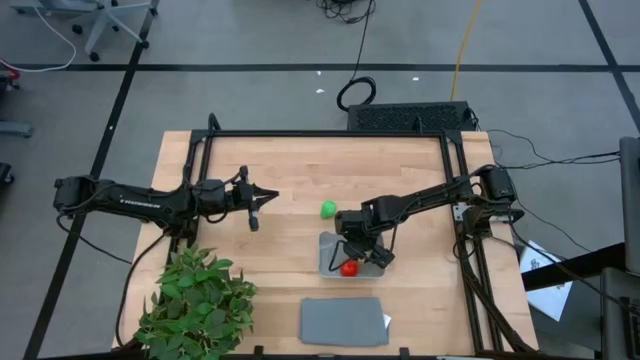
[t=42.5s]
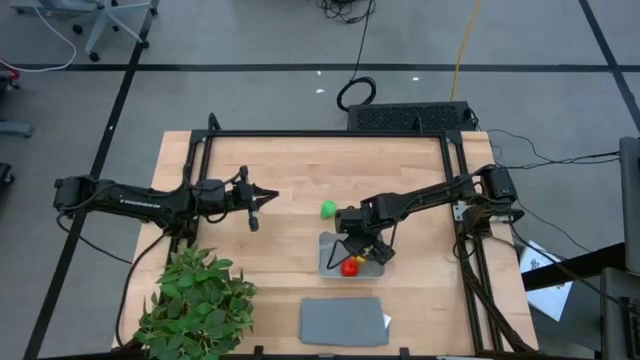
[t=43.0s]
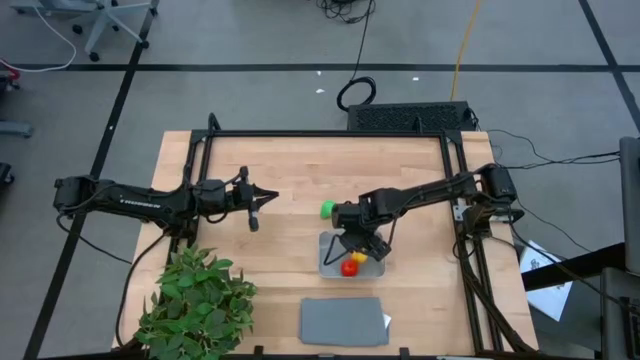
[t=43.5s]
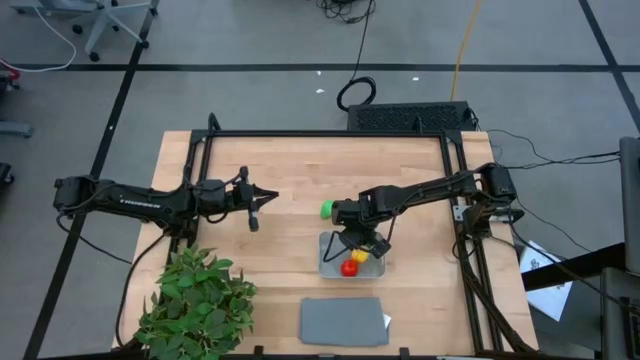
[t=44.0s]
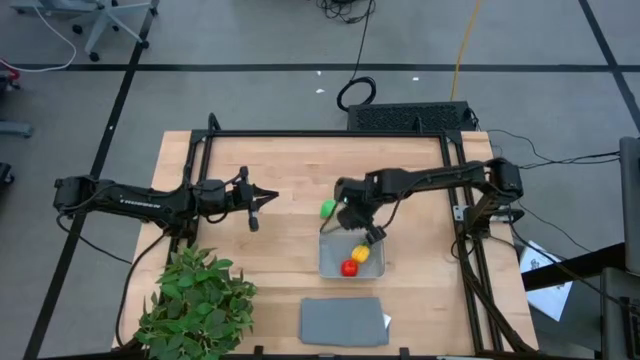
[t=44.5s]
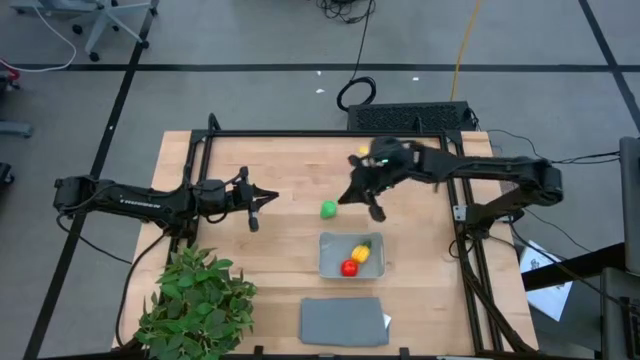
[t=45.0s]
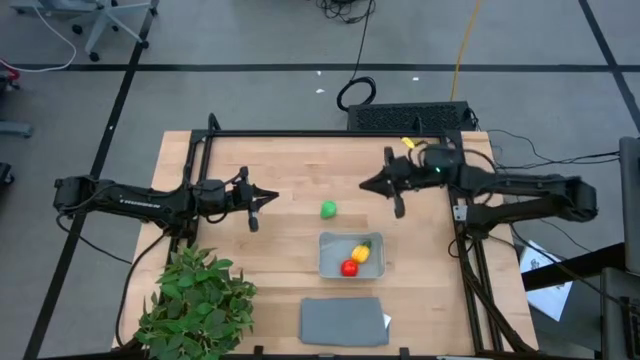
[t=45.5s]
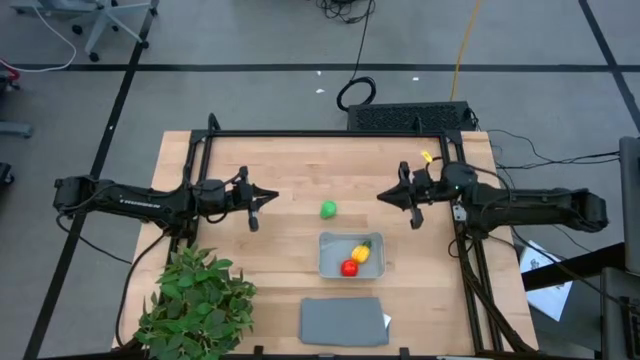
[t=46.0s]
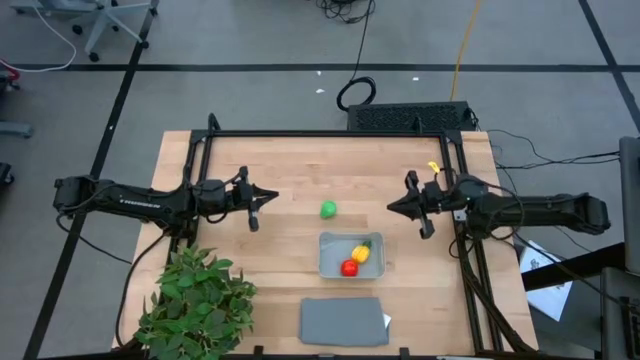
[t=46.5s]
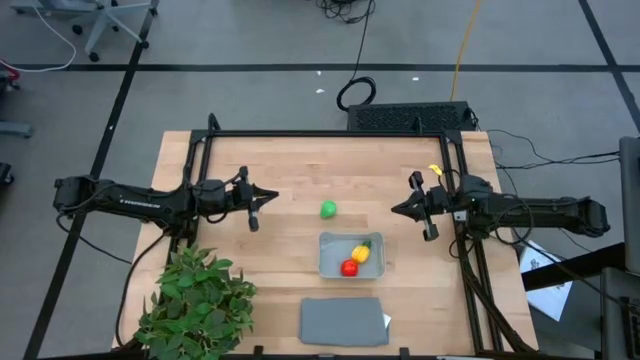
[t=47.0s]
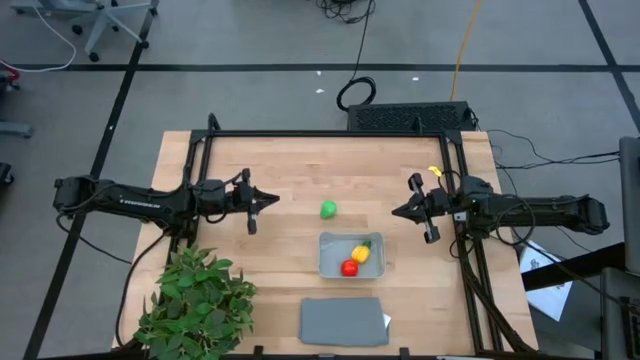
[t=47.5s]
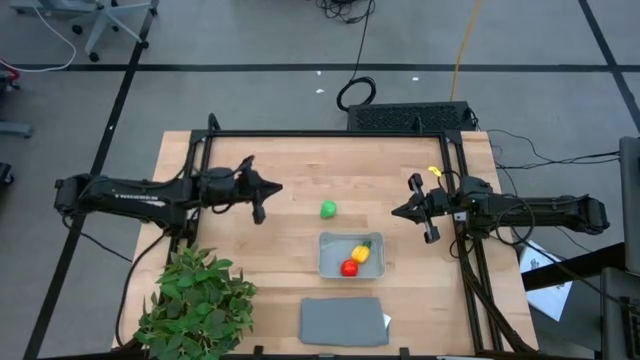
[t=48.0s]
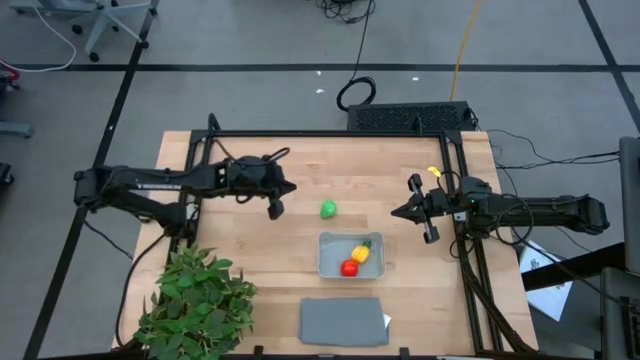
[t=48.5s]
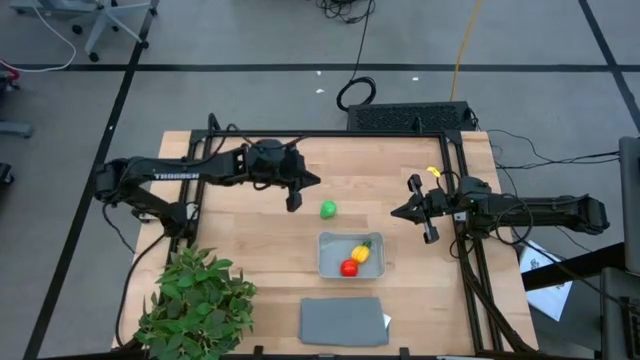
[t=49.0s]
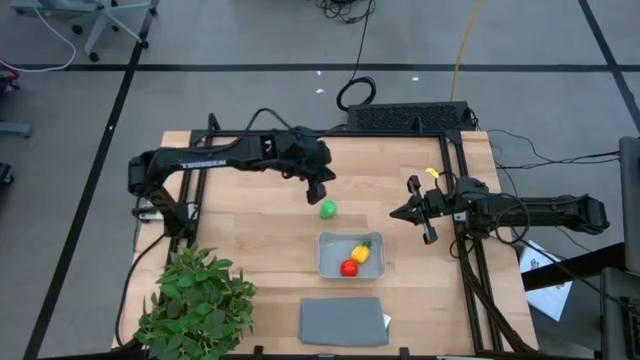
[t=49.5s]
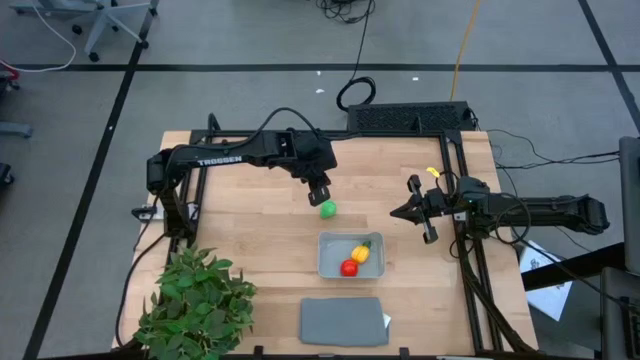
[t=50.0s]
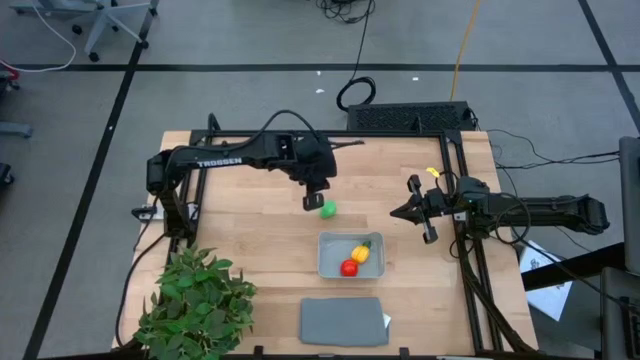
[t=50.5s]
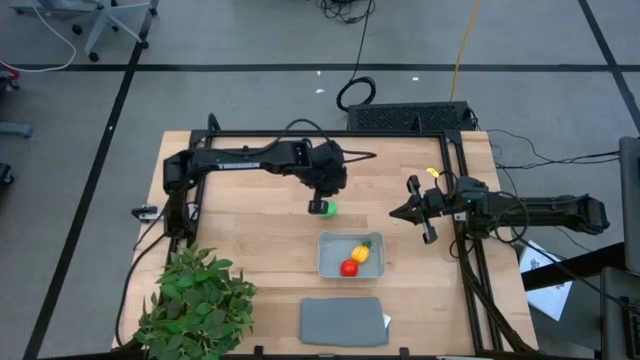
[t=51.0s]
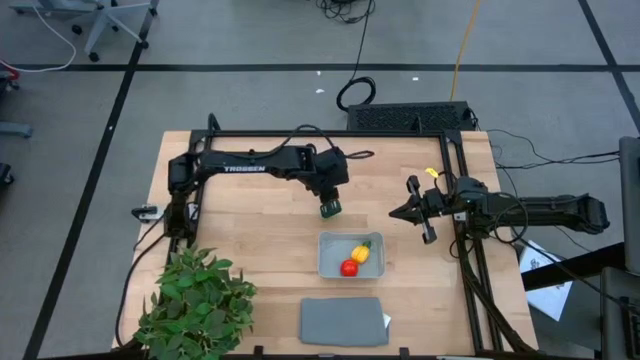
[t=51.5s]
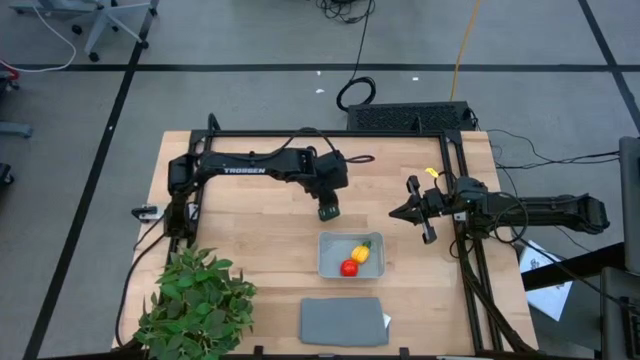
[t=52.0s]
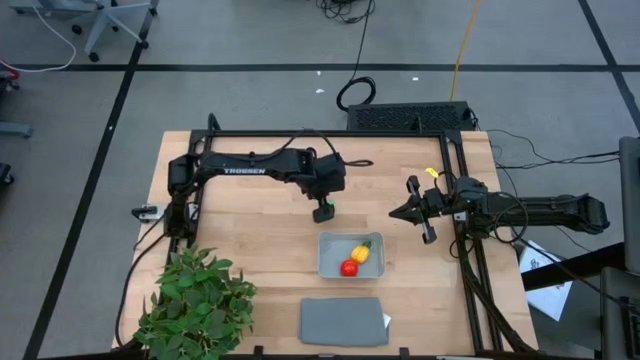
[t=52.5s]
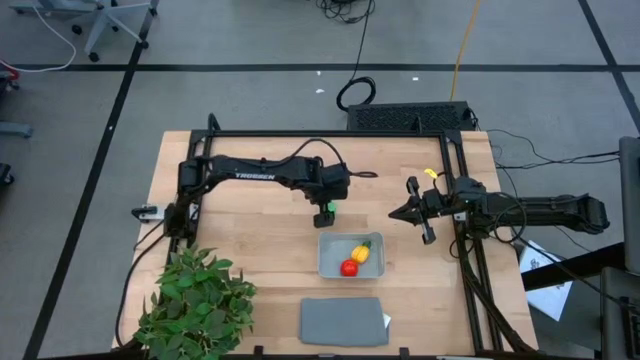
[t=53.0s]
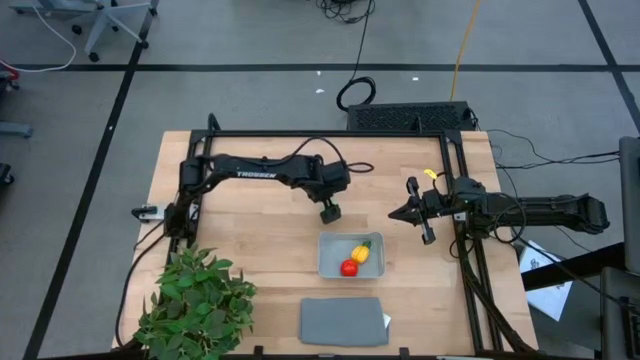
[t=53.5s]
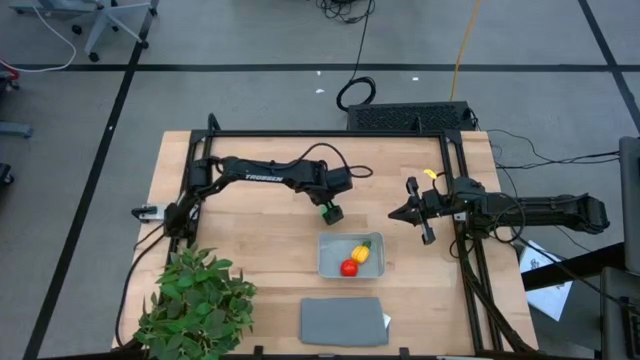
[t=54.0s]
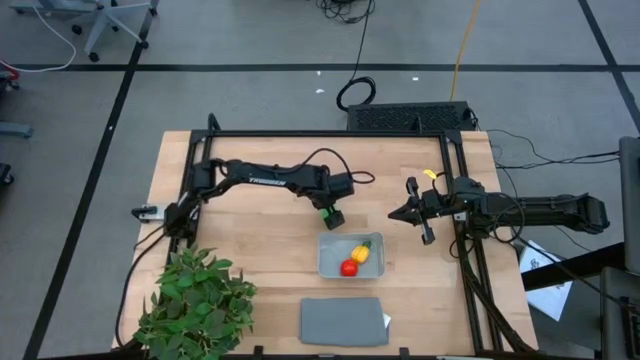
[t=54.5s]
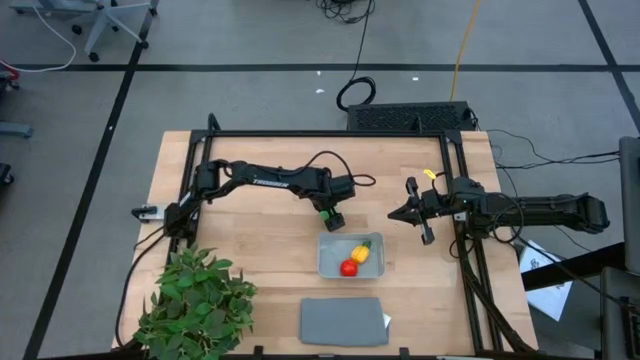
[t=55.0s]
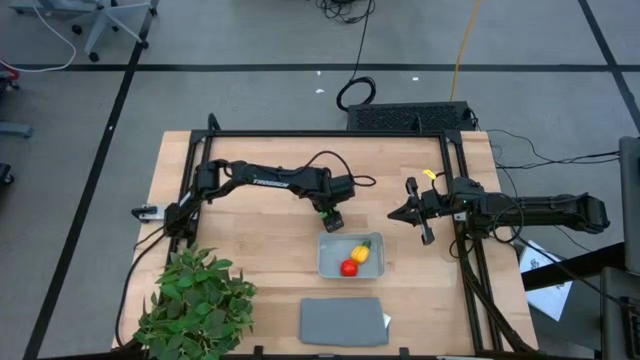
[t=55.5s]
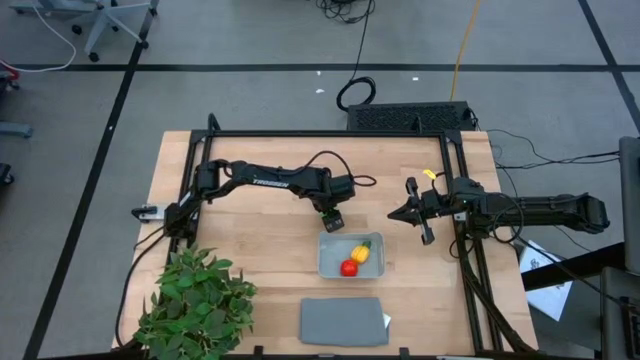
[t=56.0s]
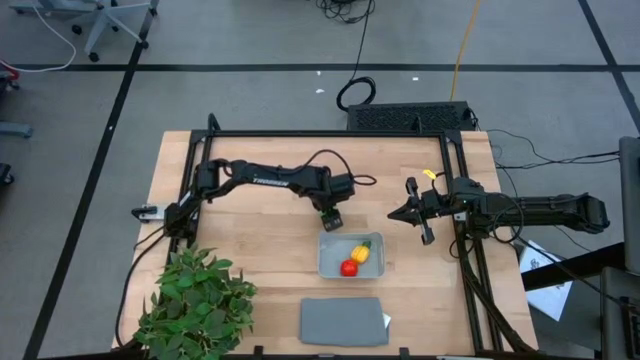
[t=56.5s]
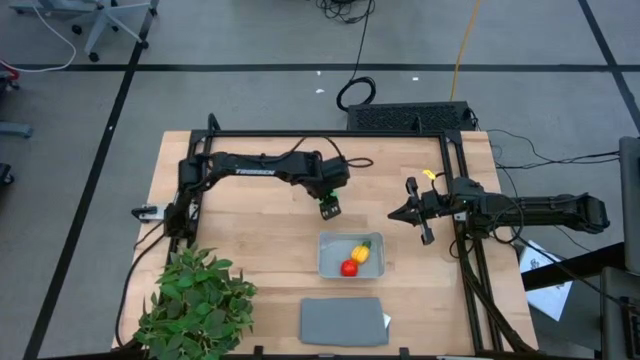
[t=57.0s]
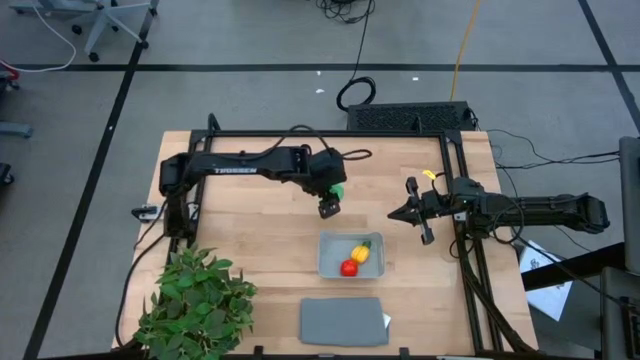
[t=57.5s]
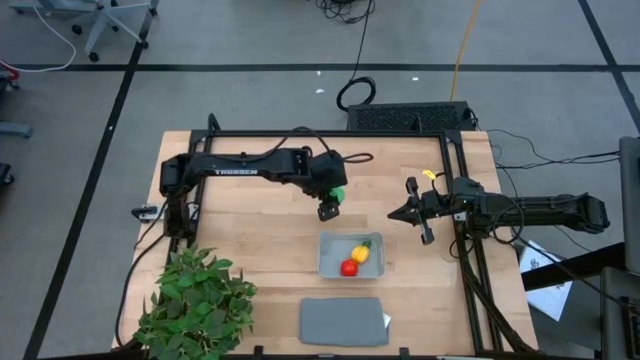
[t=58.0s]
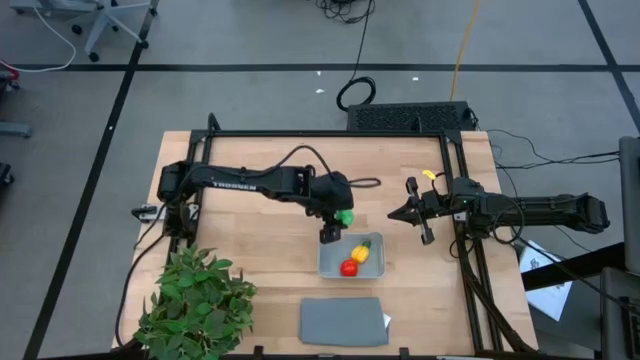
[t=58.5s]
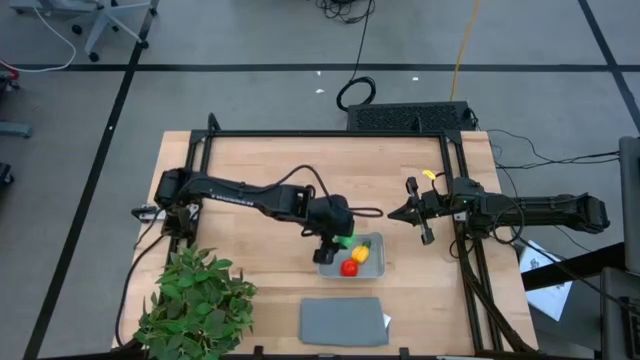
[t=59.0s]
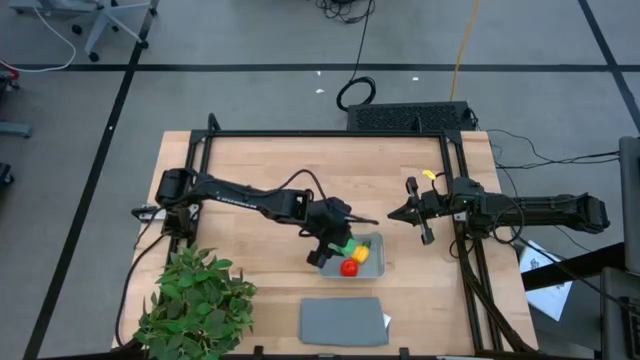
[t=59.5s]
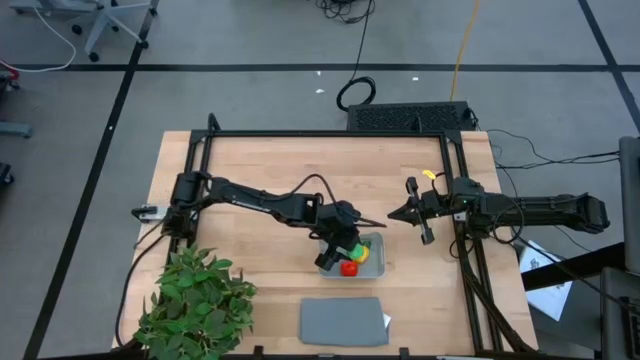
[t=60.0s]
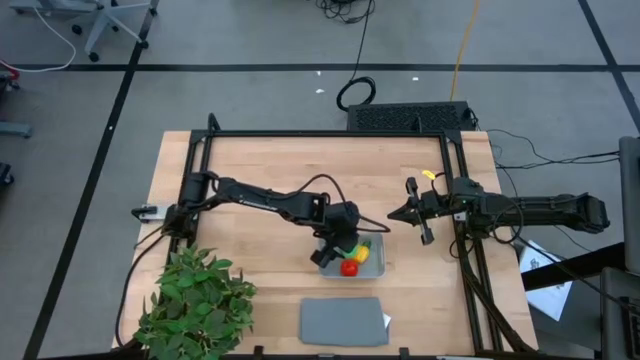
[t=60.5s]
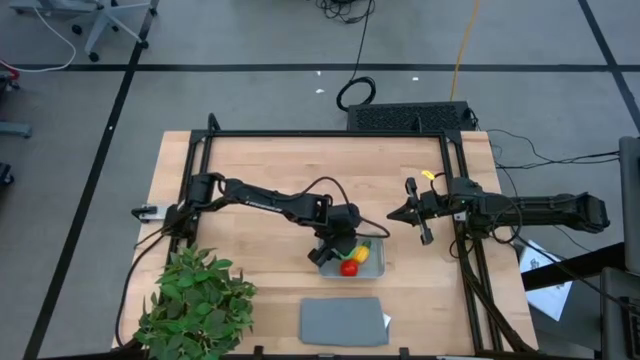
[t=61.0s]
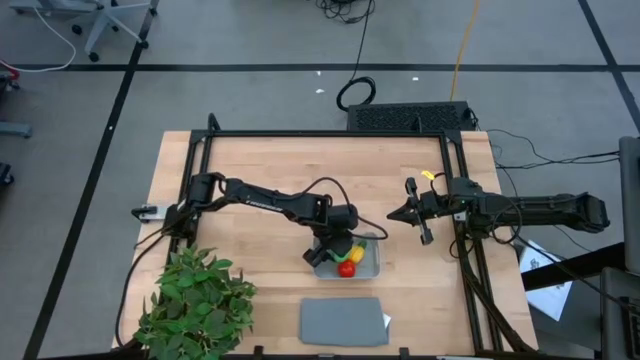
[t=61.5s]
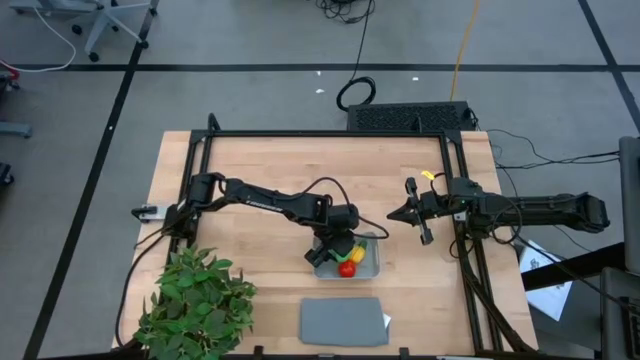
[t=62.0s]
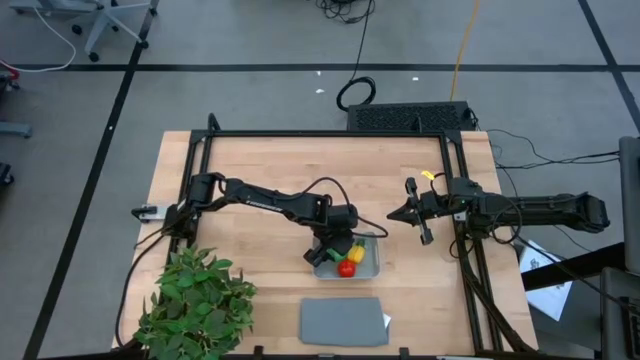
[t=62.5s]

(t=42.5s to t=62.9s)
Task: Pick and placing Produce into tupperware
Put the green pear into the gray bin

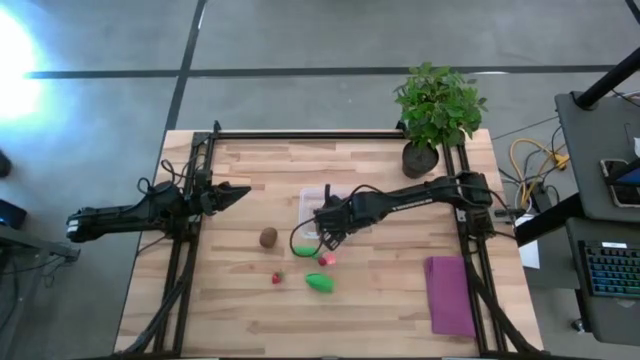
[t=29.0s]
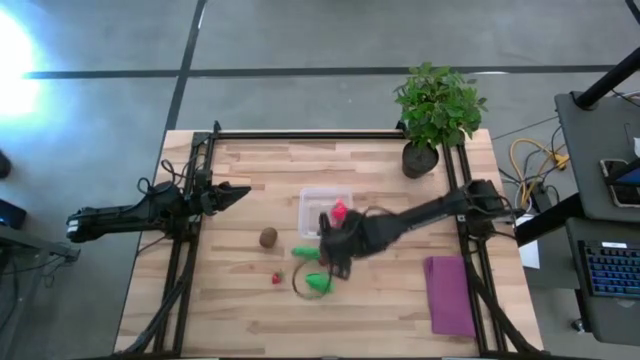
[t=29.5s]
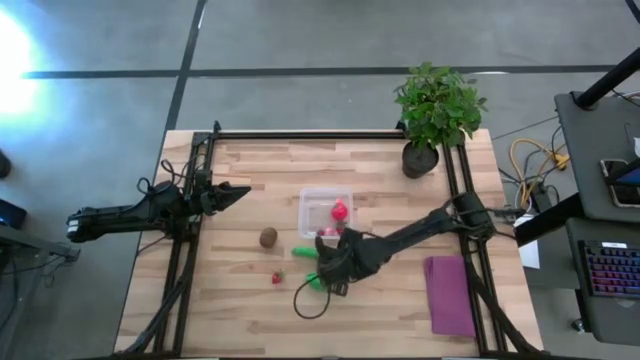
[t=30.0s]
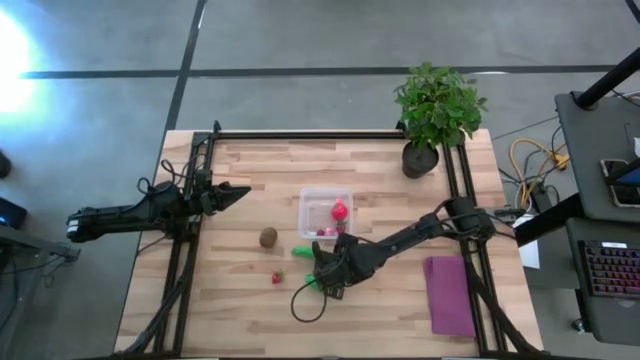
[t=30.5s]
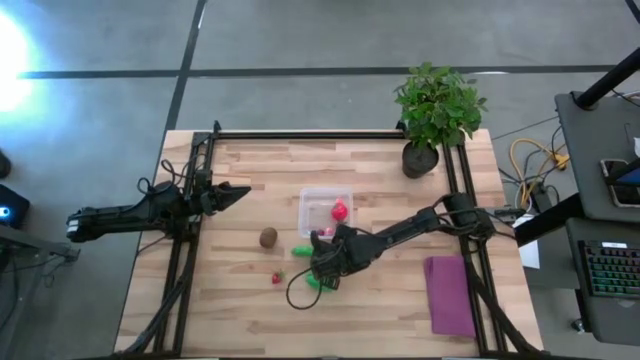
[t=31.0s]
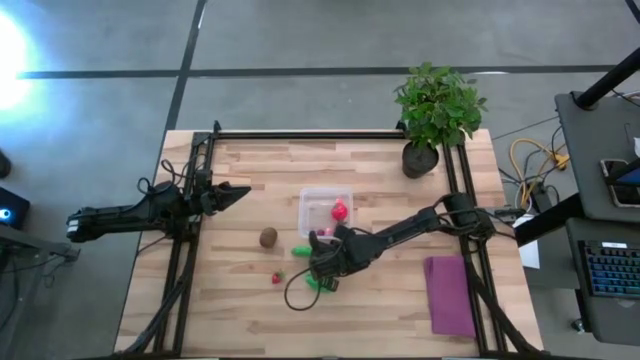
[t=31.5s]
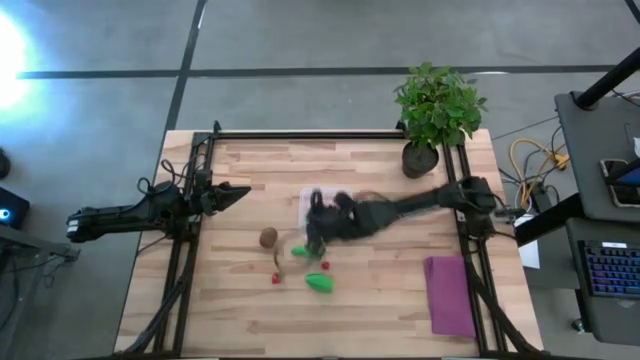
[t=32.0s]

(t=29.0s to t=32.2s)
Task: Pick and placing Produce into tupperware
Put the pink peach into the transparent bin
